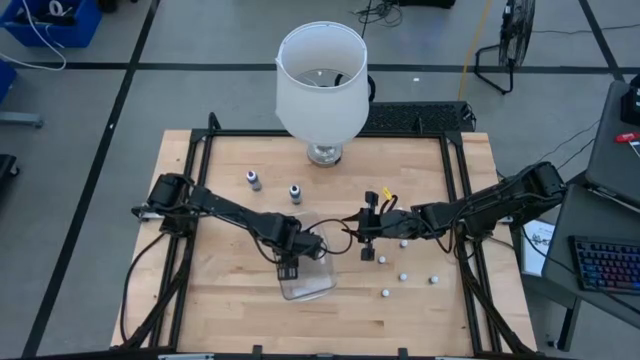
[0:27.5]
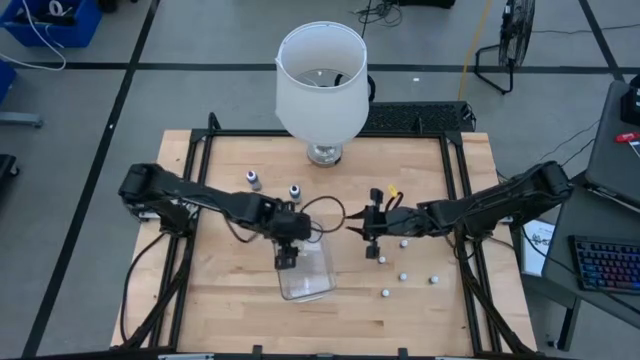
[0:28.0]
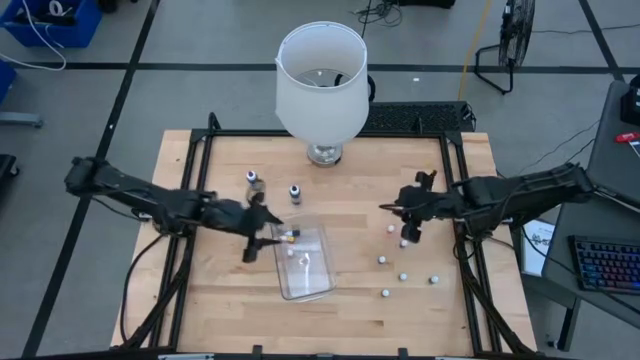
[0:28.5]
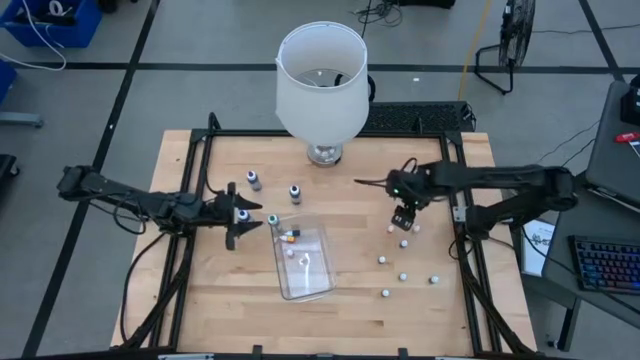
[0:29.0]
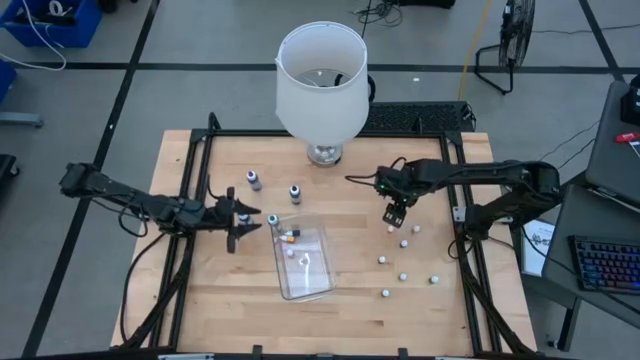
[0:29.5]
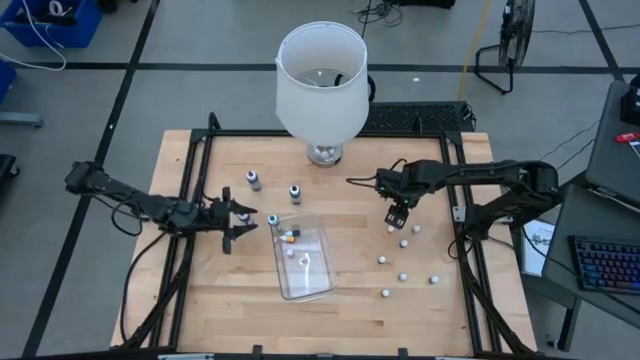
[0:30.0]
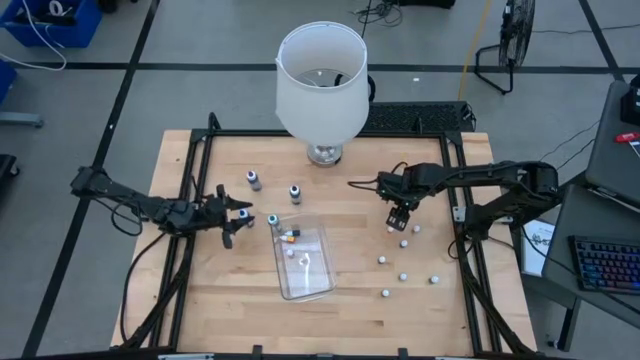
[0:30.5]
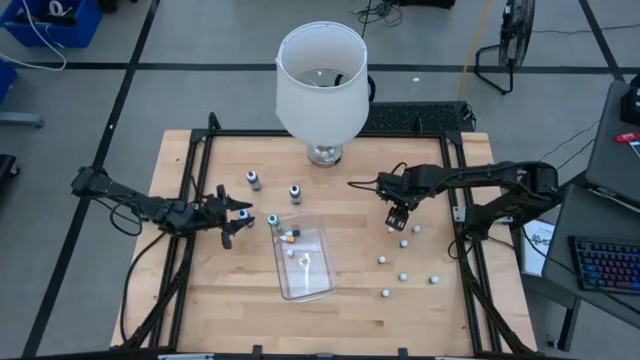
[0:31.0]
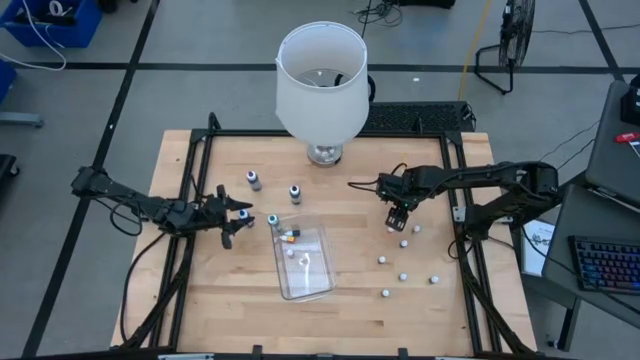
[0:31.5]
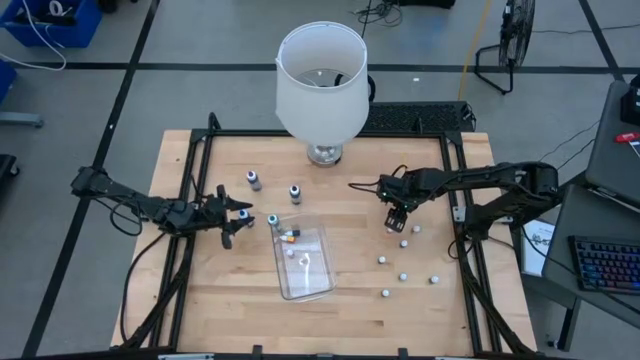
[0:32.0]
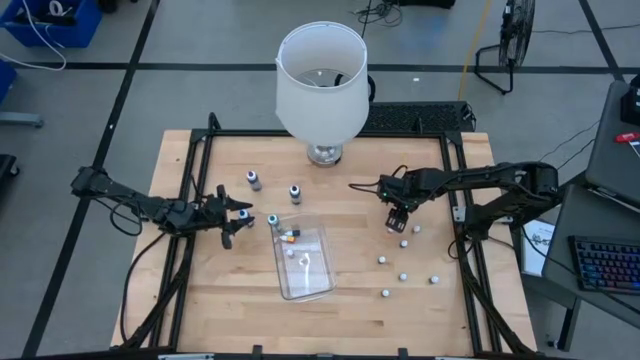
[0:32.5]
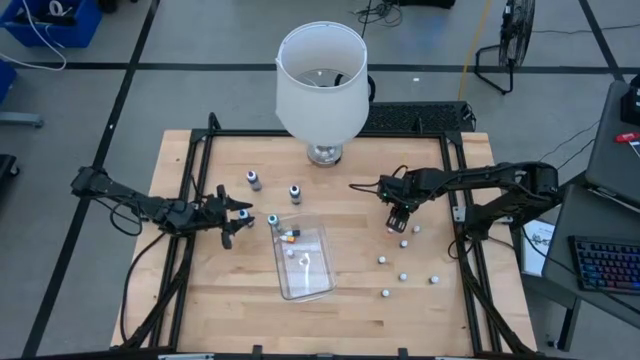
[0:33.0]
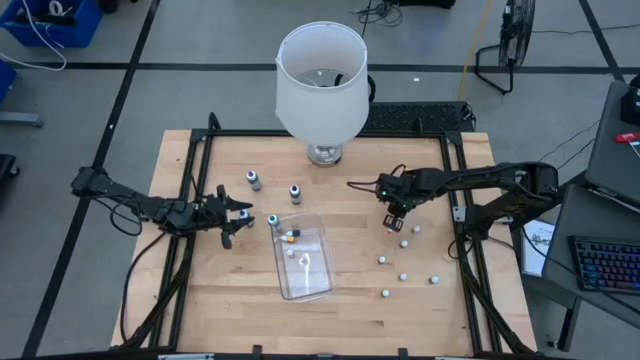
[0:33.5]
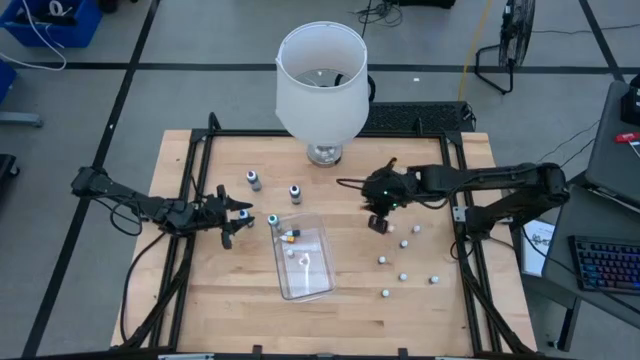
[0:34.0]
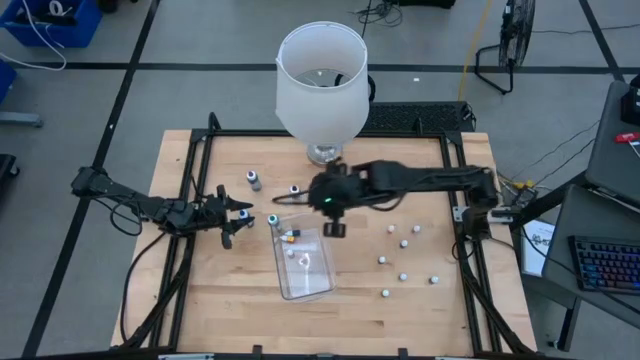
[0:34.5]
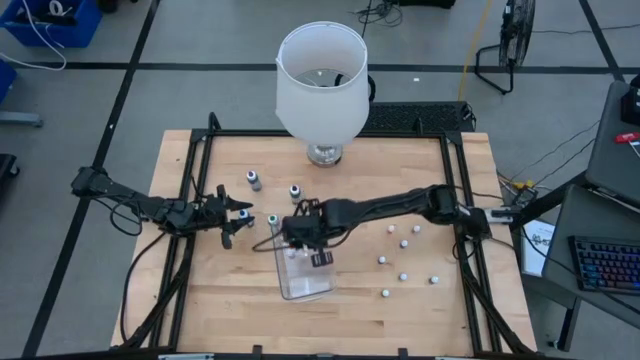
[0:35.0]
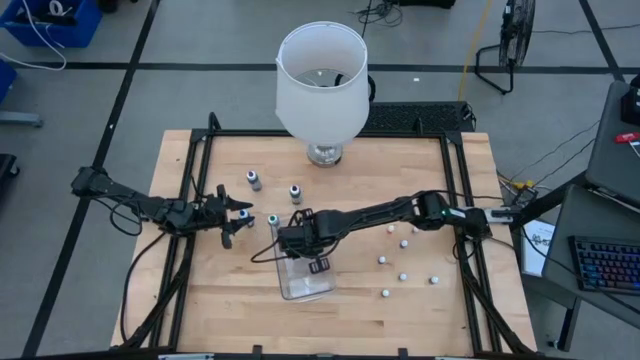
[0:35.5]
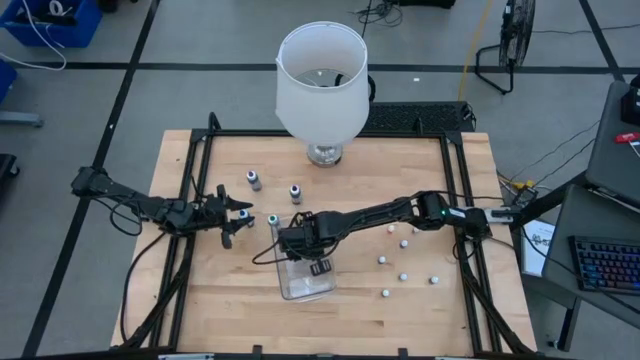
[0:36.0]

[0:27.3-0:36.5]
Task: Pick & Place food coloring
Put the orange food coloring bottle into the bin

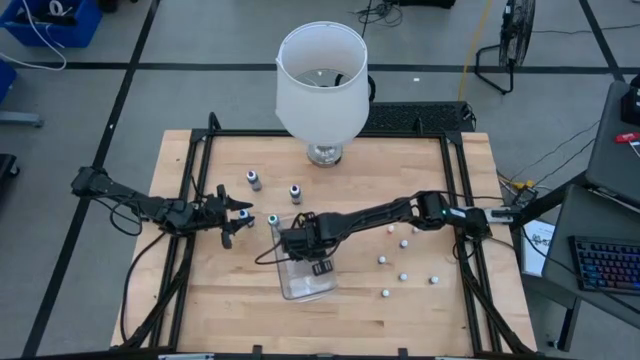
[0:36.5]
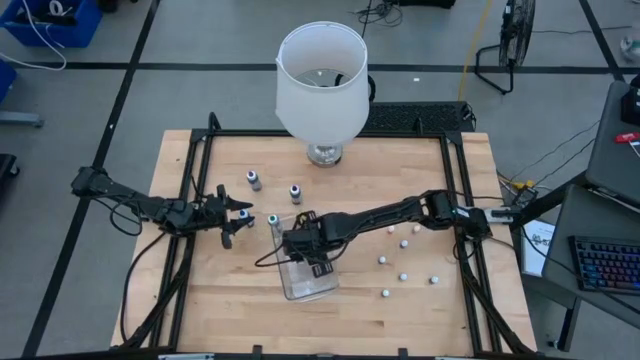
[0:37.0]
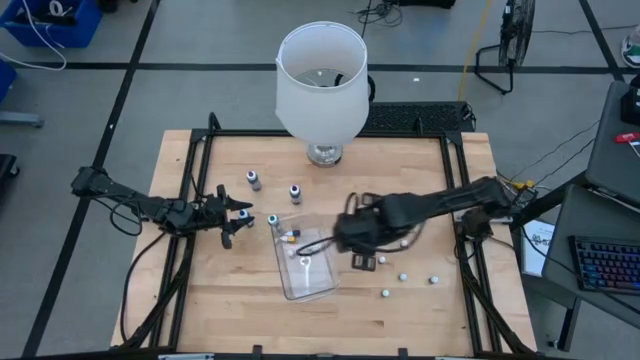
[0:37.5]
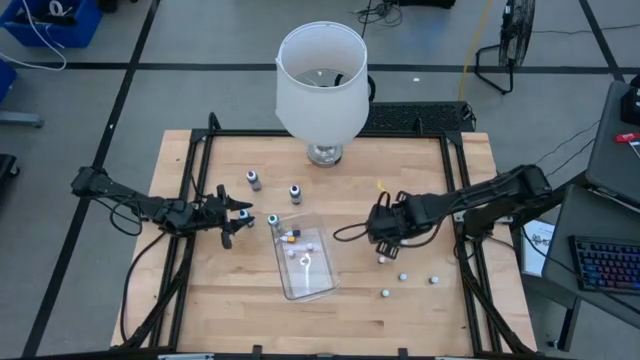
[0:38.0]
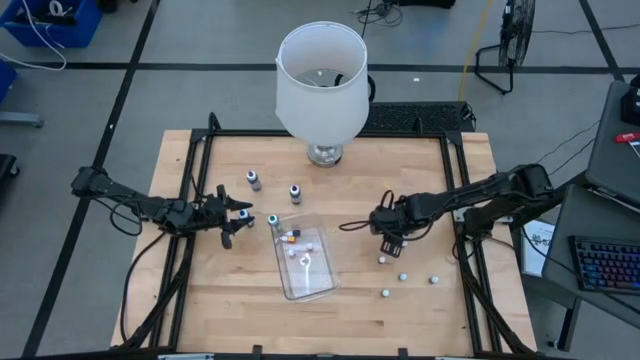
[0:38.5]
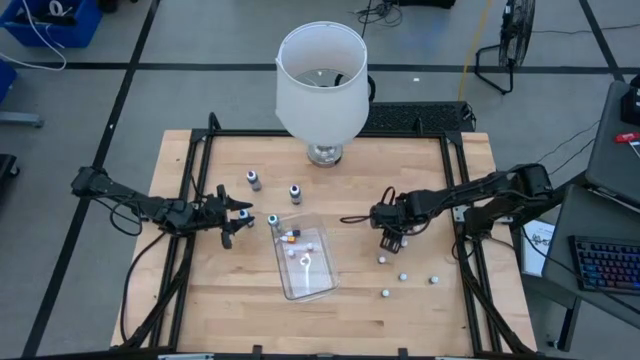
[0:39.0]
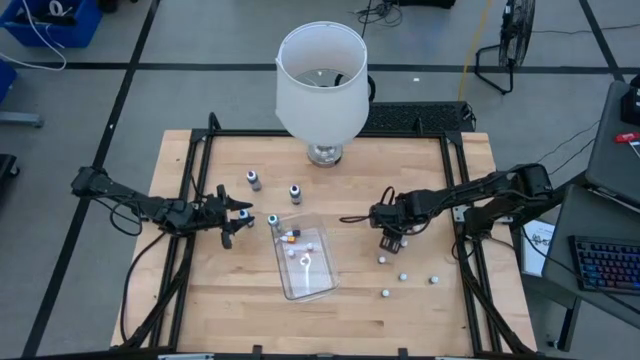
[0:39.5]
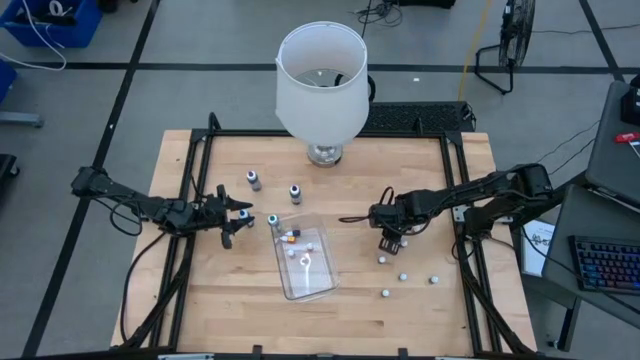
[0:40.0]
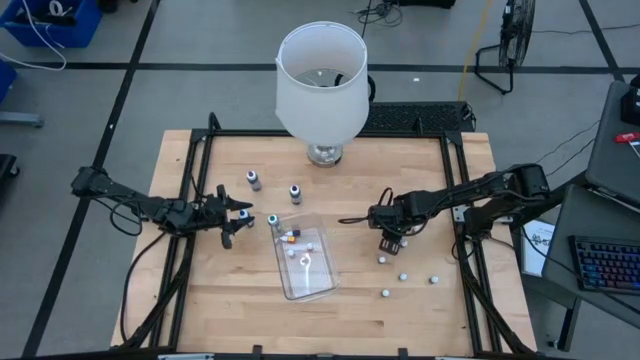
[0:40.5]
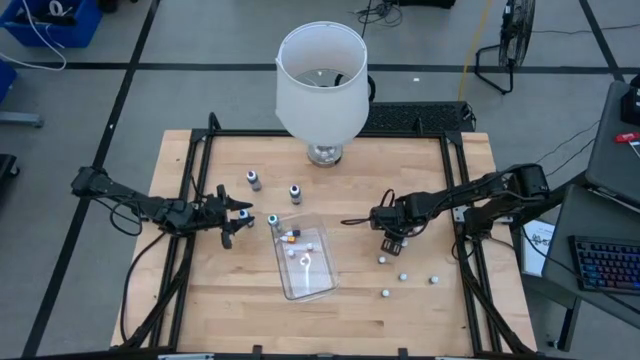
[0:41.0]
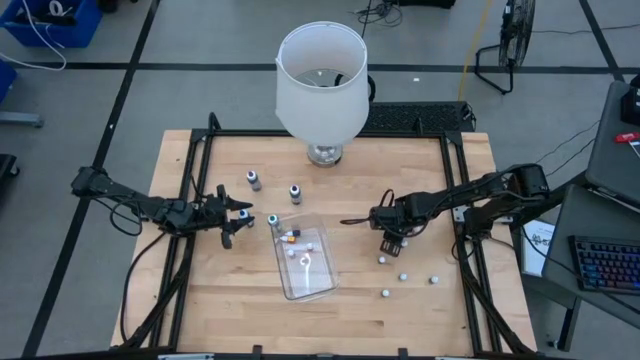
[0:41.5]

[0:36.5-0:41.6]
Put the orange food coloring bottle into the bin

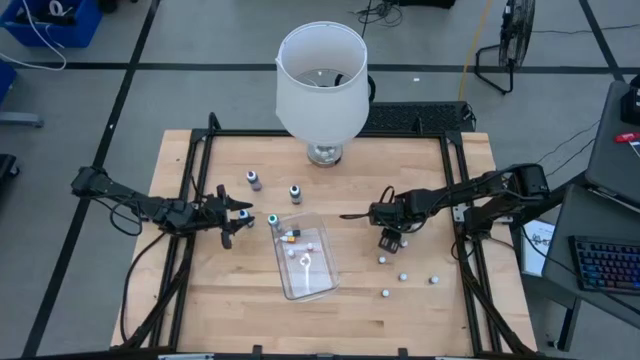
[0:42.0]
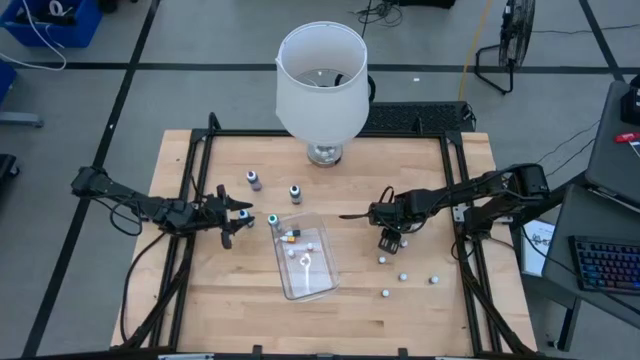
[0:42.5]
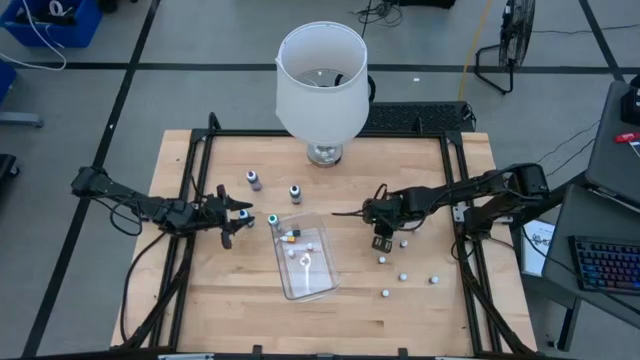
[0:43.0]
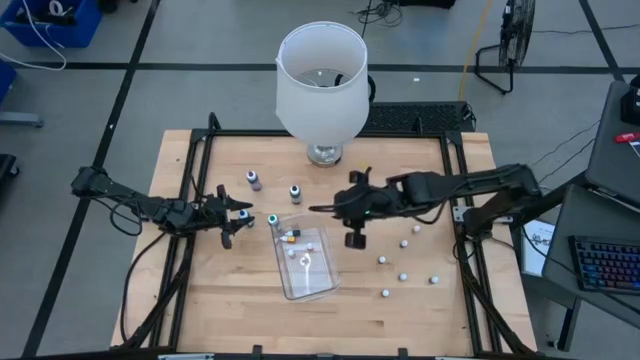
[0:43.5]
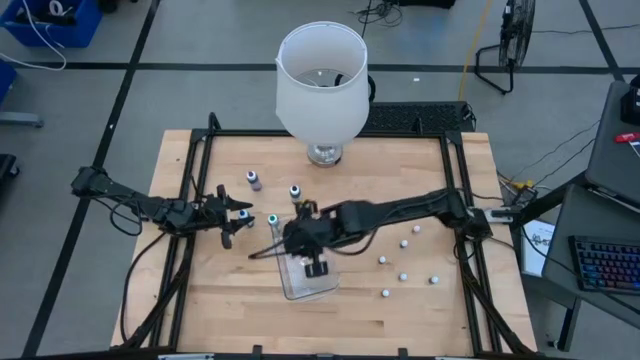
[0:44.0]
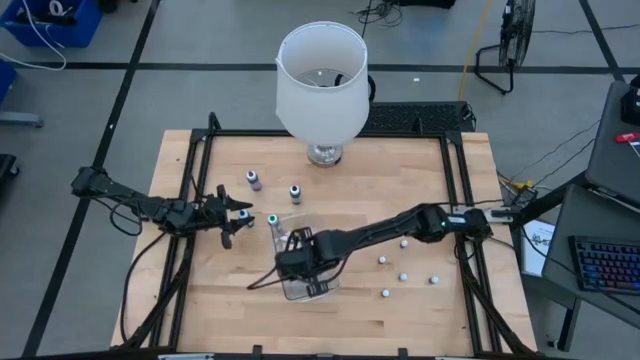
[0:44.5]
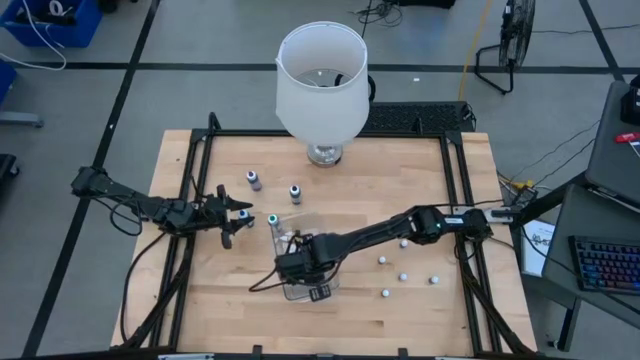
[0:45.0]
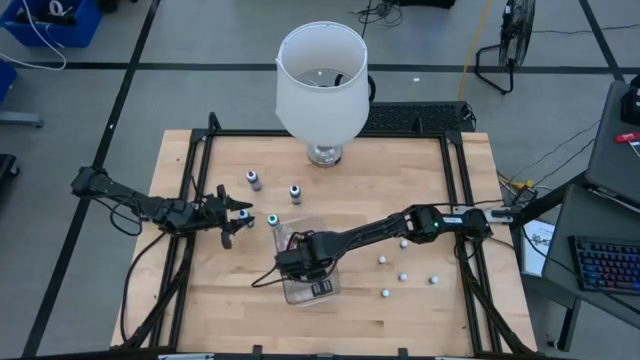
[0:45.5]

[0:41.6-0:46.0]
Put the orange food coloring bottle into the bin

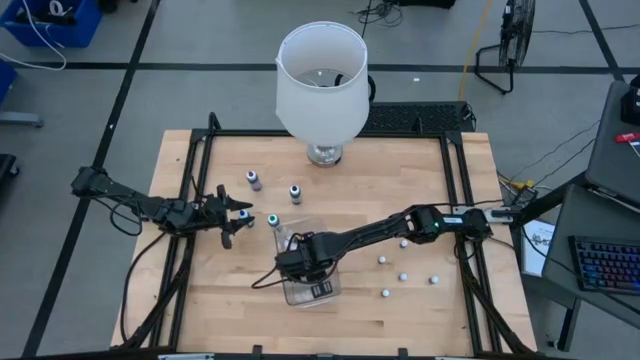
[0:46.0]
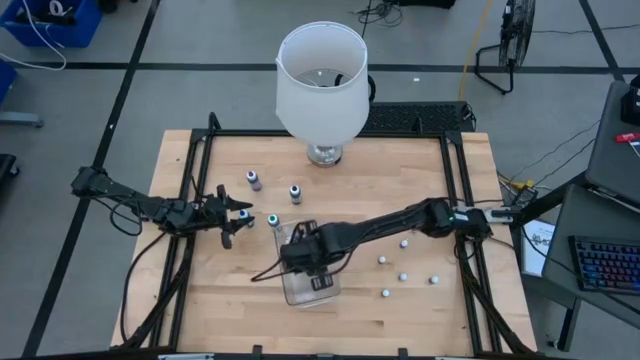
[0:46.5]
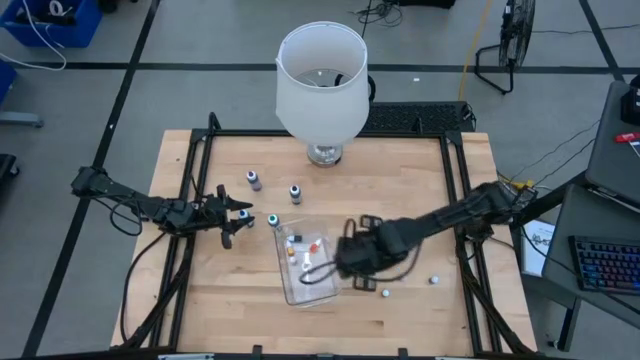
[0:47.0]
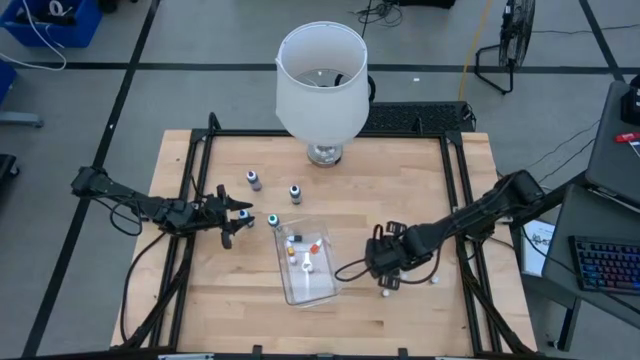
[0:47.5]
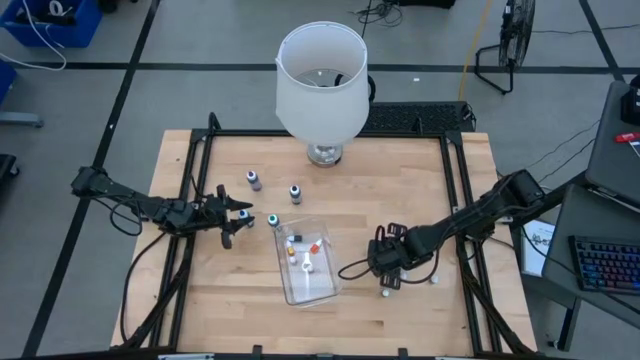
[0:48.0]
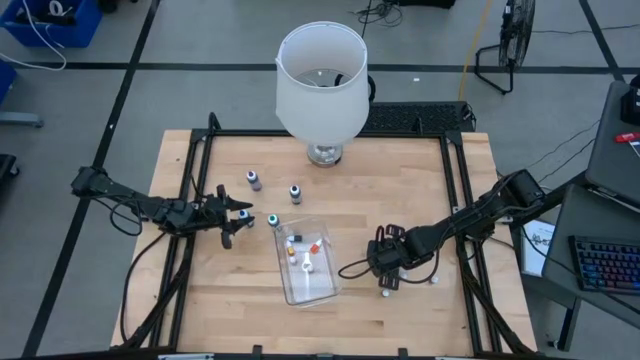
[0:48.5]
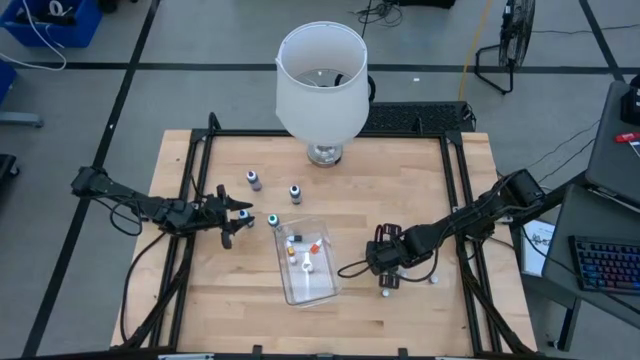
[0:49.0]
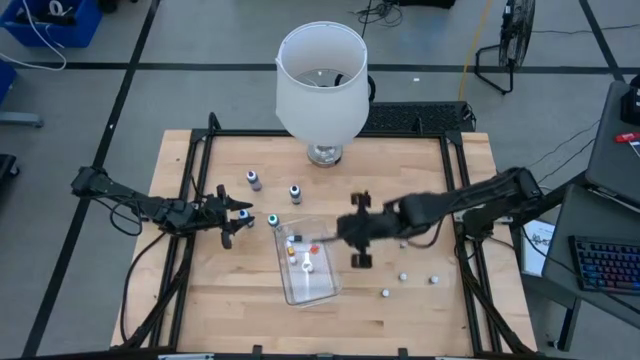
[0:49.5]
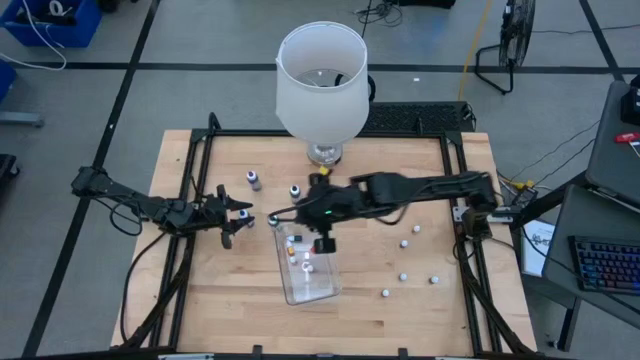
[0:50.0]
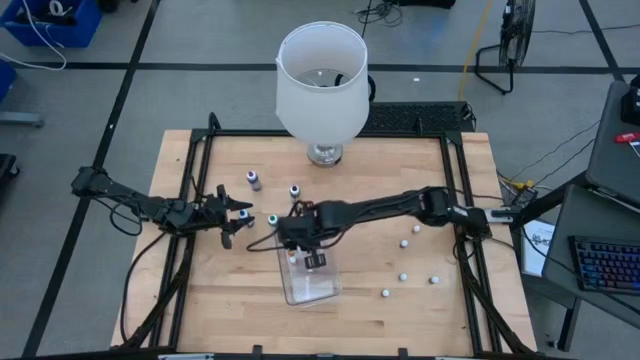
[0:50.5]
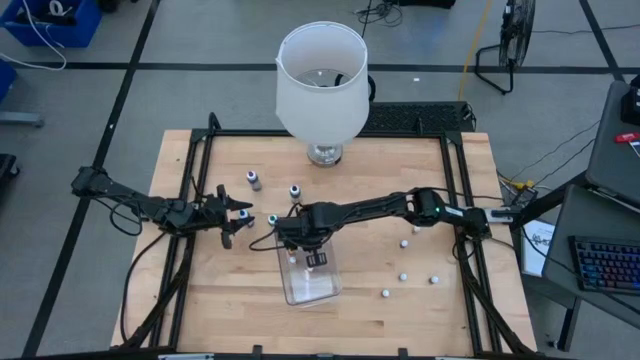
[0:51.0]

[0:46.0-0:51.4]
Put the red food coloring bottle into the bin
